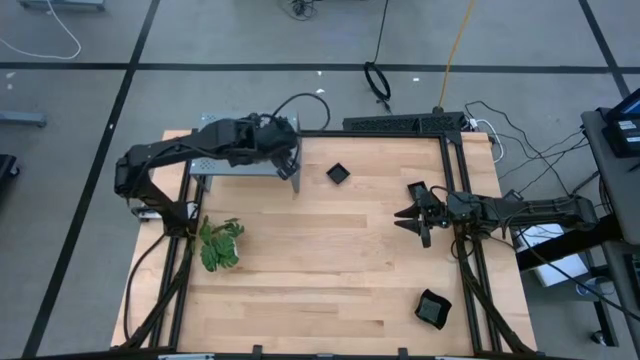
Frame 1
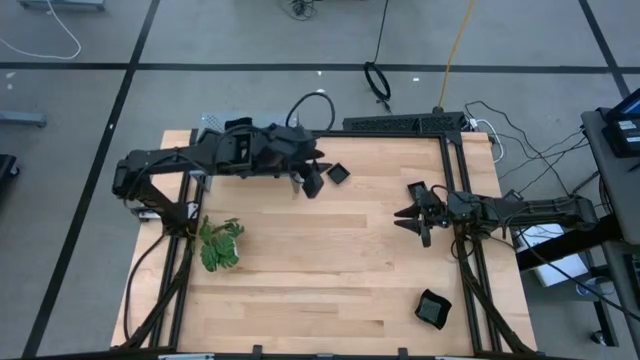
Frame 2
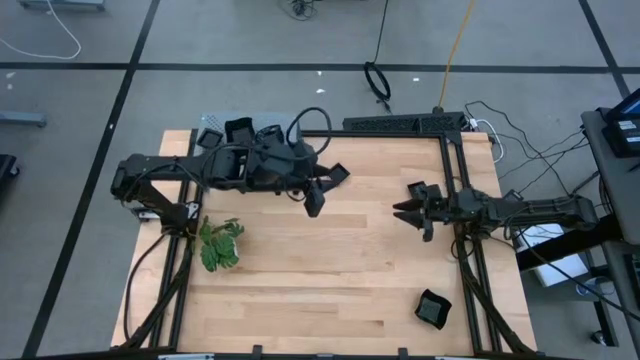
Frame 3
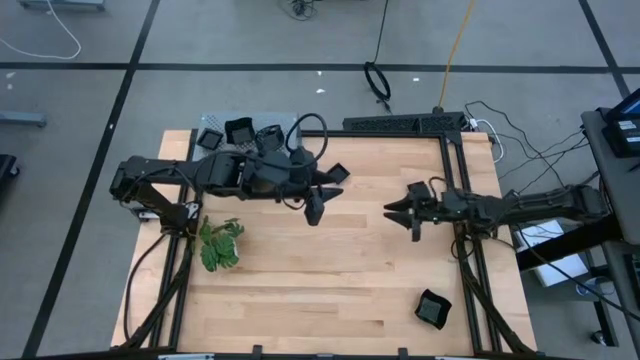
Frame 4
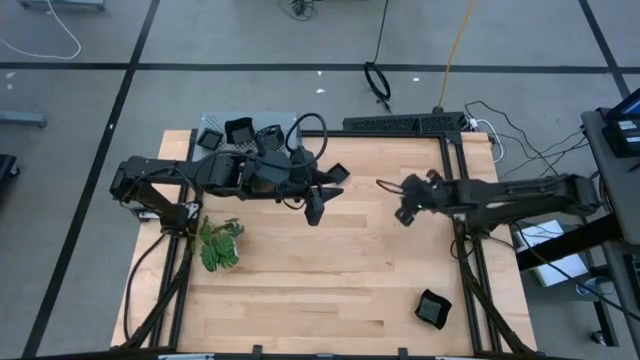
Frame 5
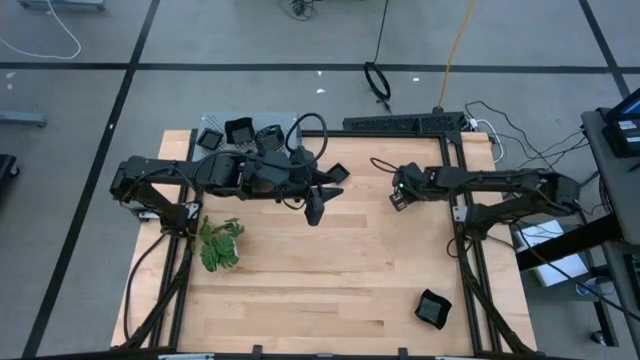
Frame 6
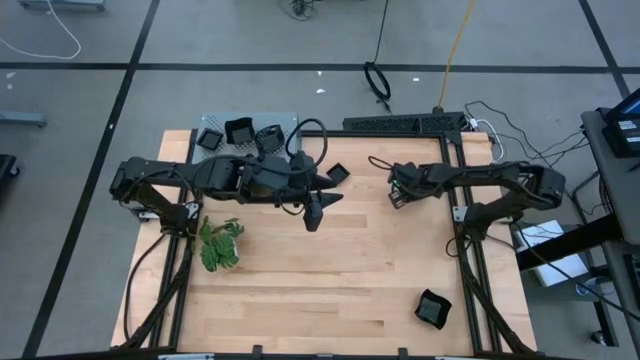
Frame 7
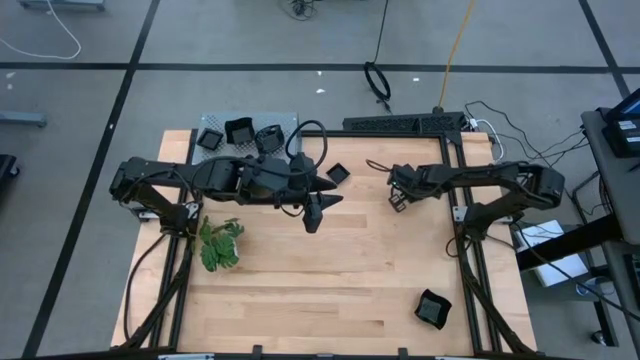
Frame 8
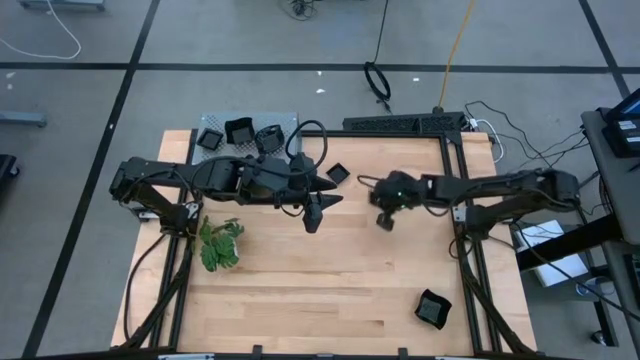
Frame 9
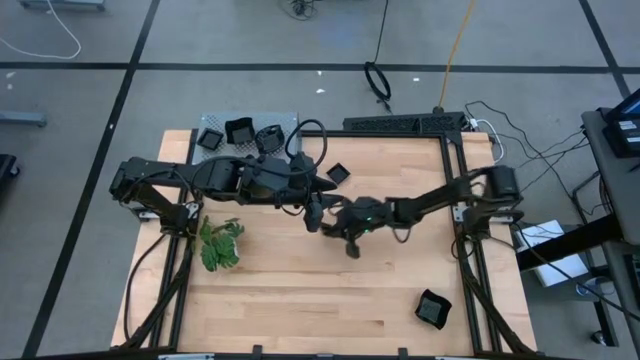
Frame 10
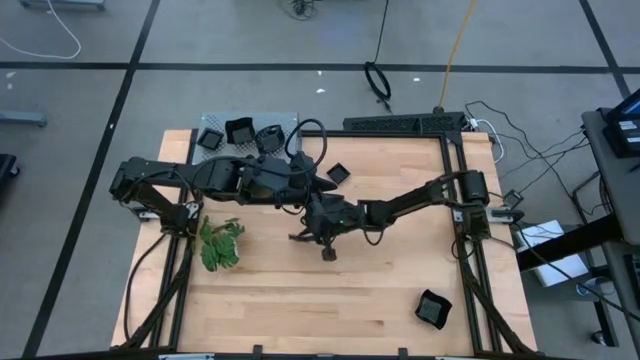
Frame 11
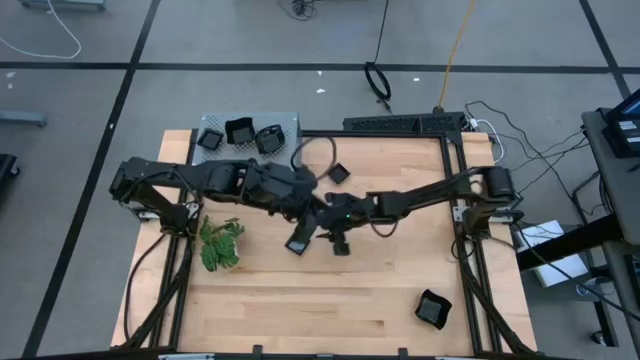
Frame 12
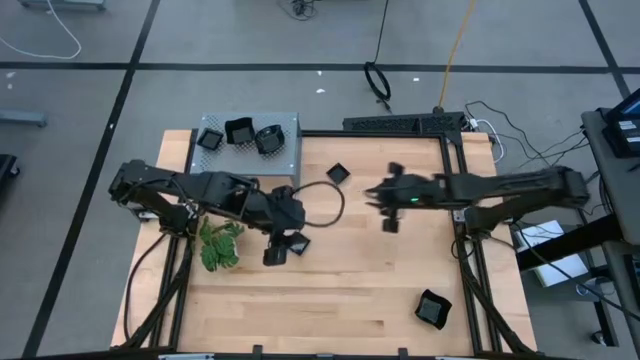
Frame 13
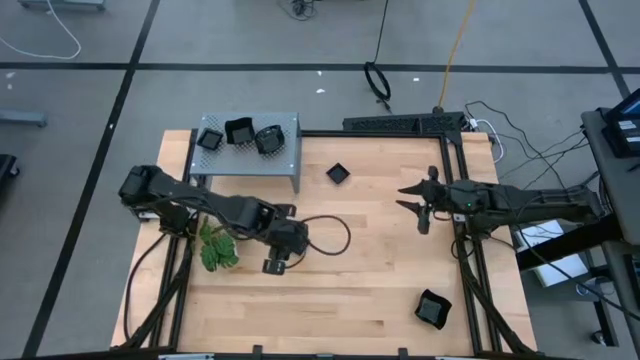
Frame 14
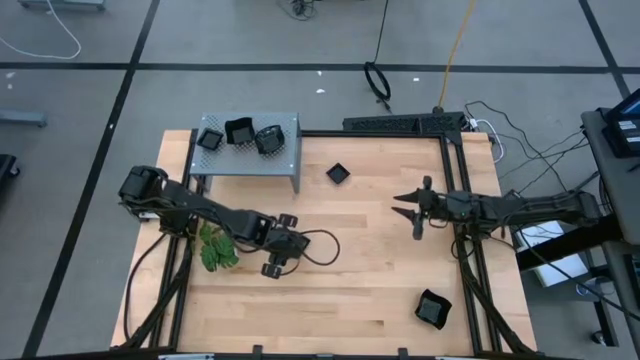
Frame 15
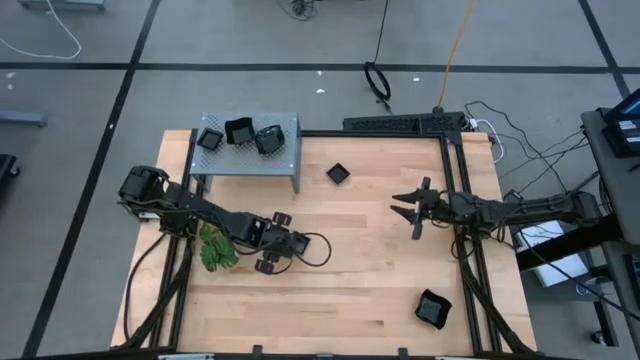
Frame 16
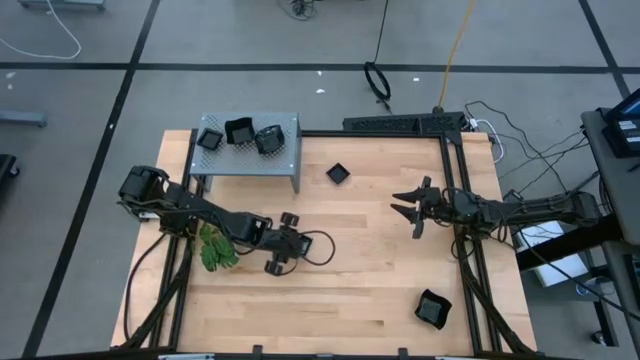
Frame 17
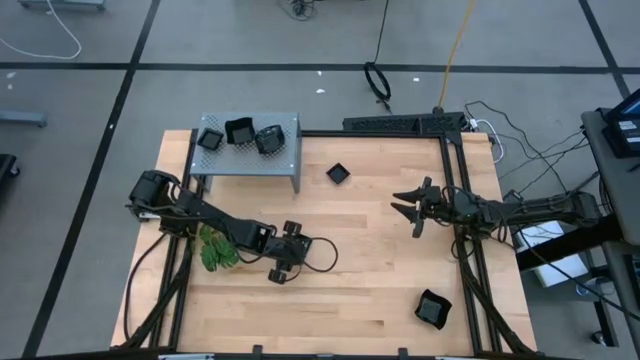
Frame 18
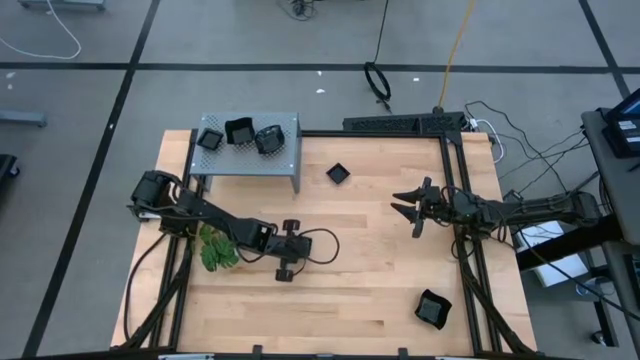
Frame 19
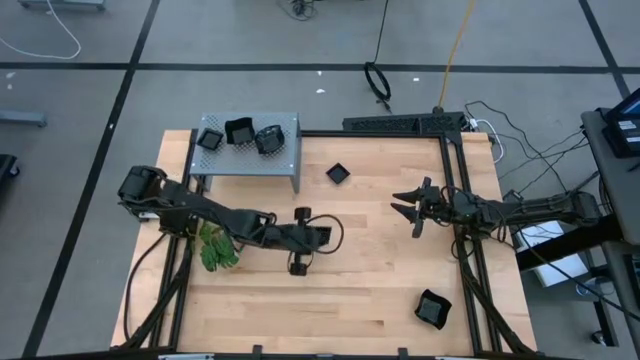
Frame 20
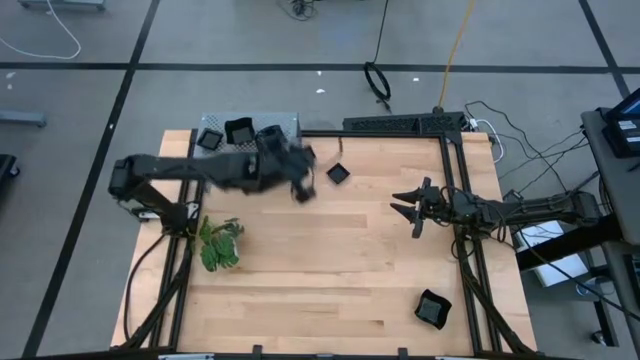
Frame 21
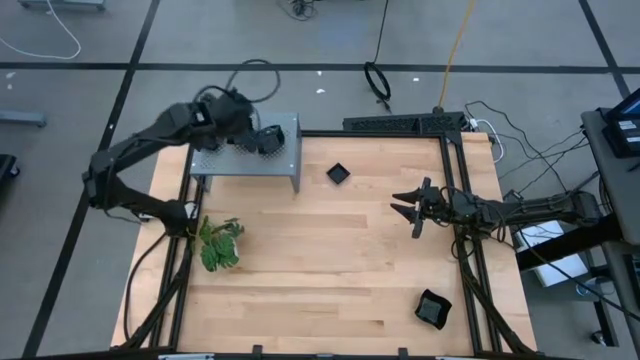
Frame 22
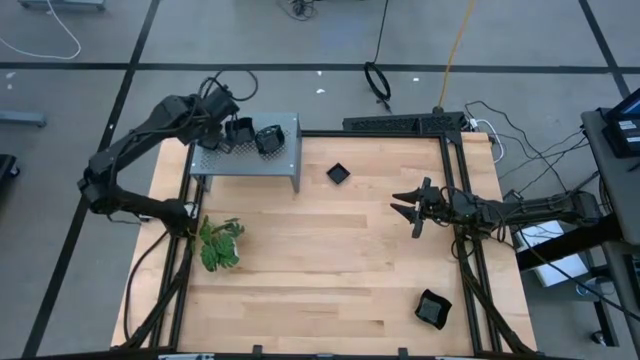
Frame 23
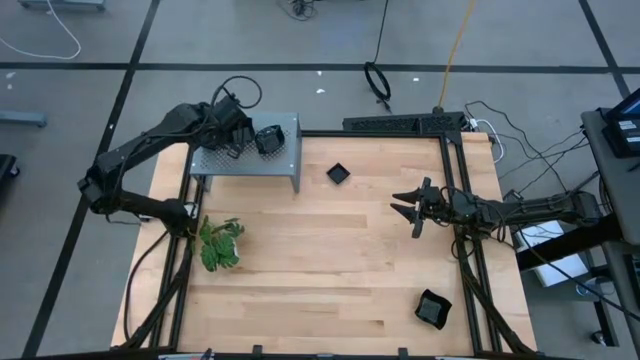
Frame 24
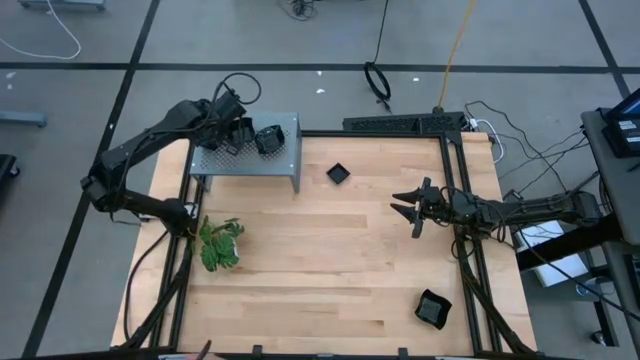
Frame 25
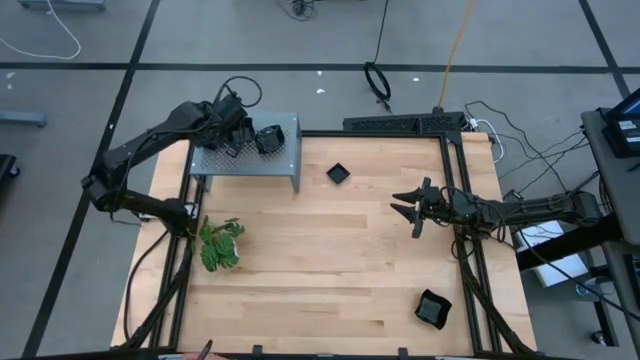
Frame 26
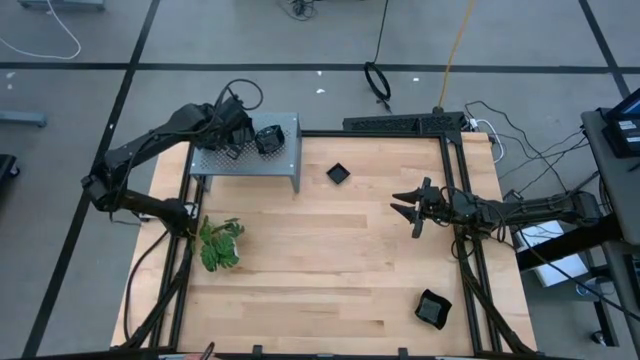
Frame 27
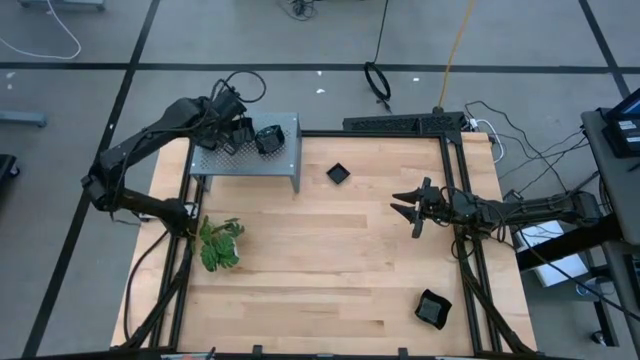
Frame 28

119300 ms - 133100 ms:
Task: Pick & Place Mini shaped plates
Stack the square plate on top of the square plate on the shelf

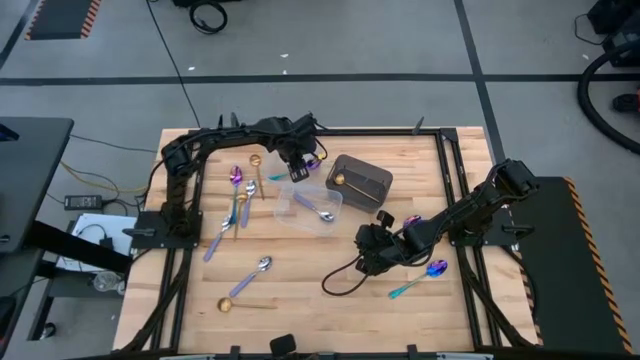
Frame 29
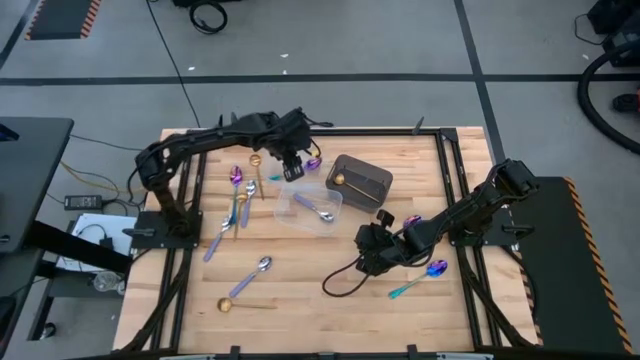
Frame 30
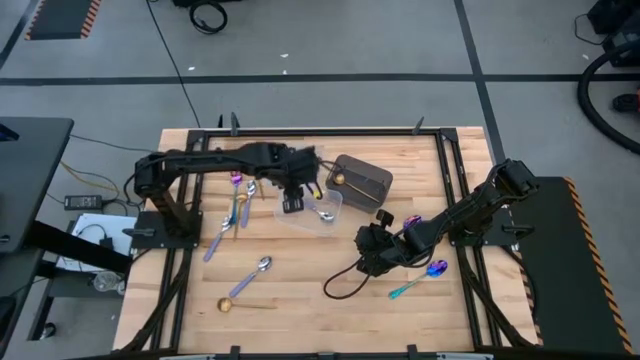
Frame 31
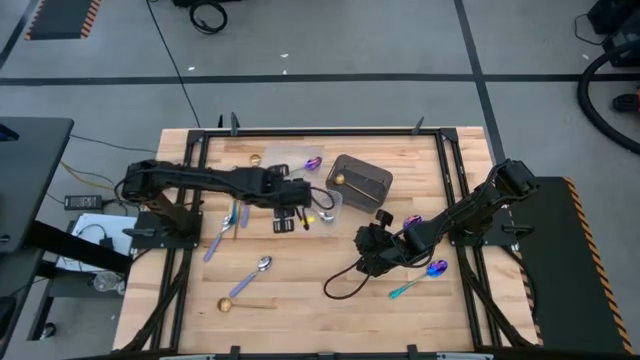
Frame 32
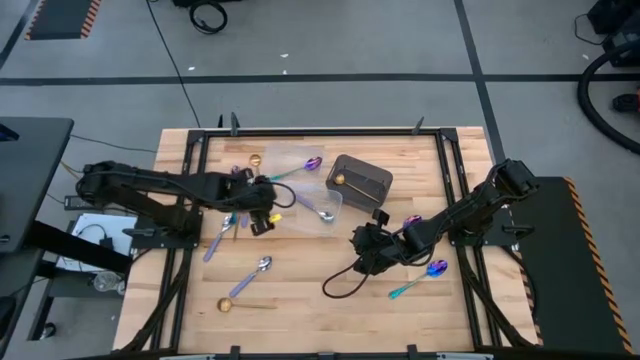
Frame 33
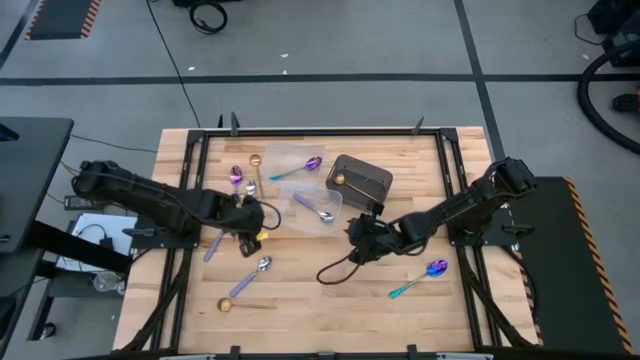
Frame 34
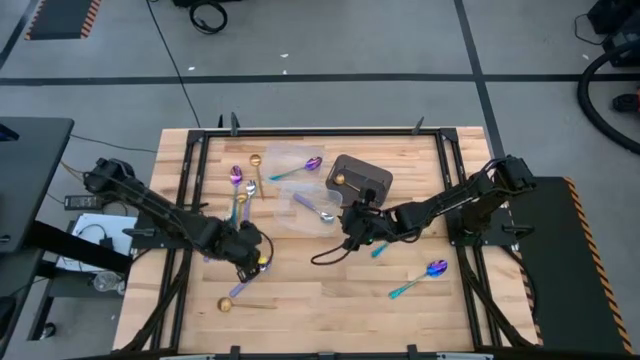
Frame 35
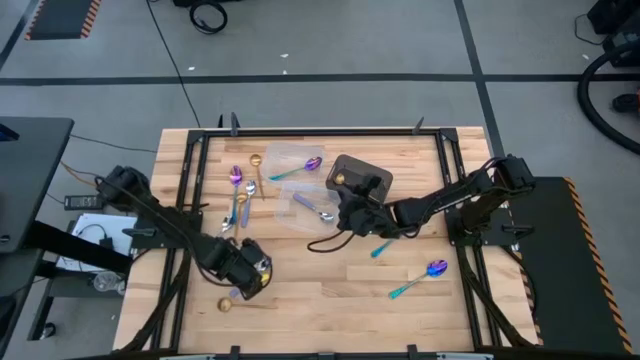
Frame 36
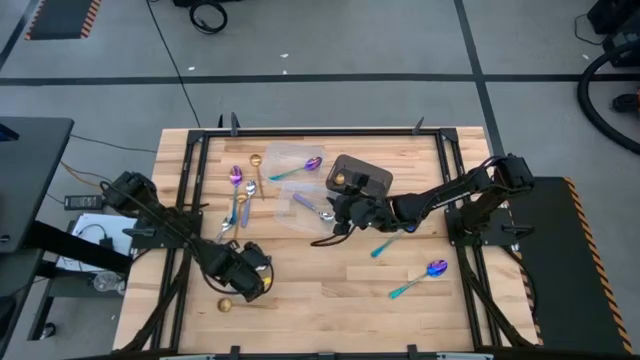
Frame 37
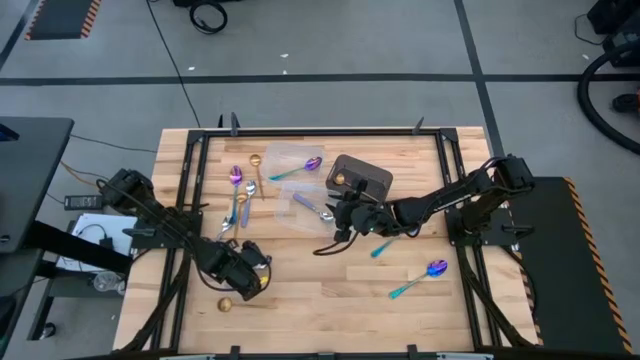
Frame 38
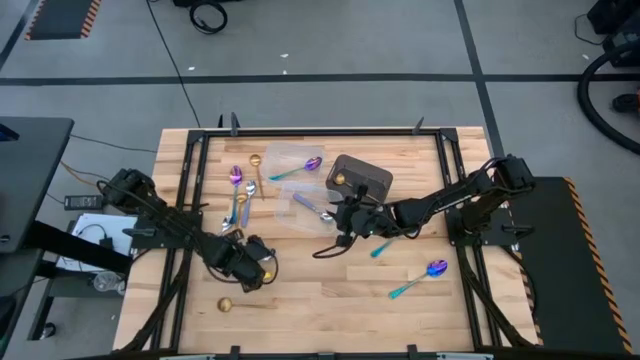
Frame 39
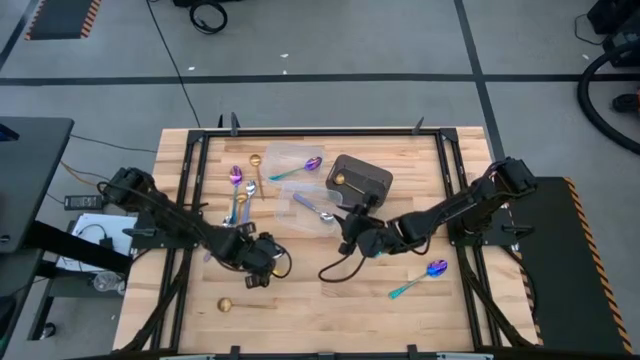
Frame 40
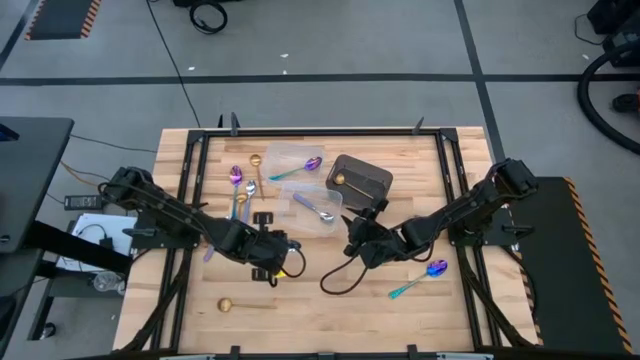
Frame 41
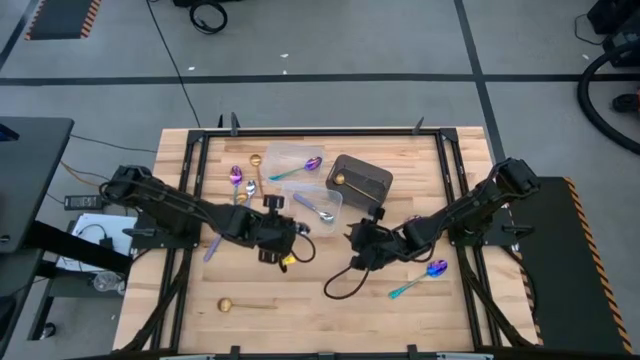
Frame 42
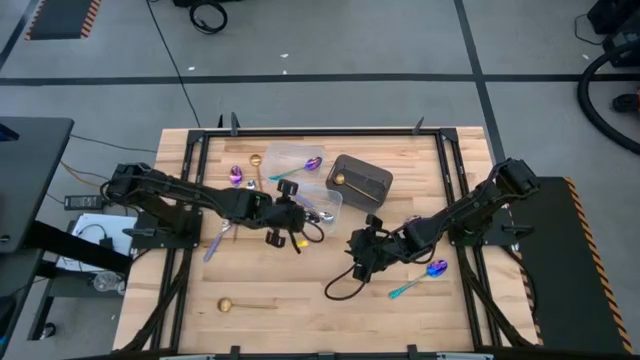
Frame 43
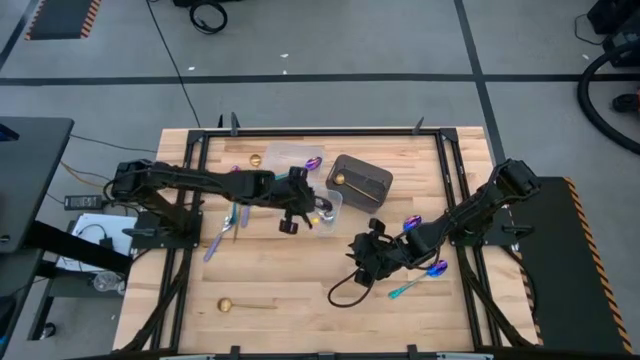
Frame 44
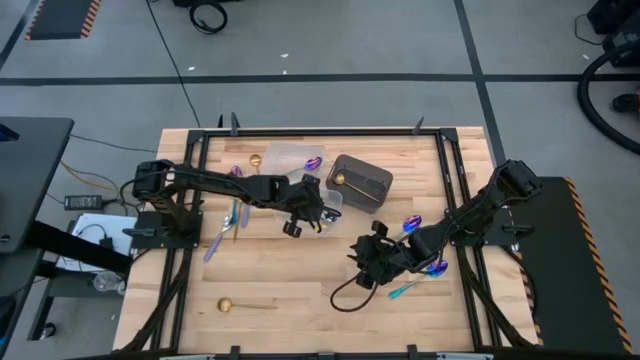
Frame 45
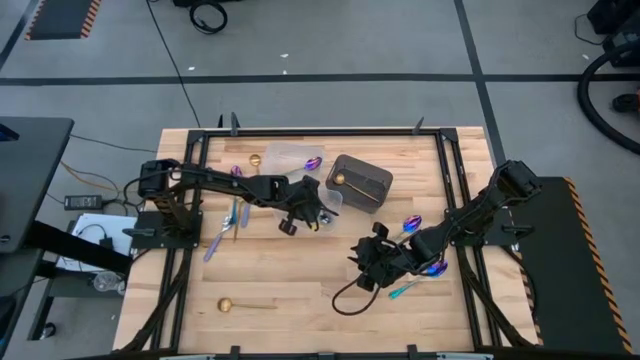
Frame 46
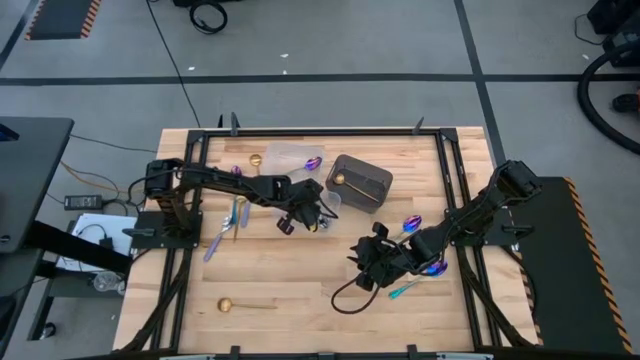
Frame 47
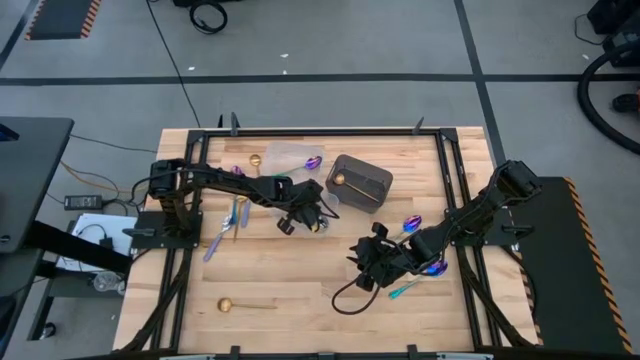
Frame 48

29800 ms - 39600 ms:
Task: Sort silverware by color (type)
Put the purple spoon into the bottom transparent bin
